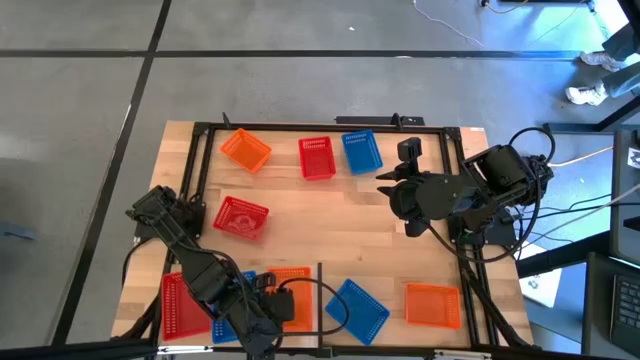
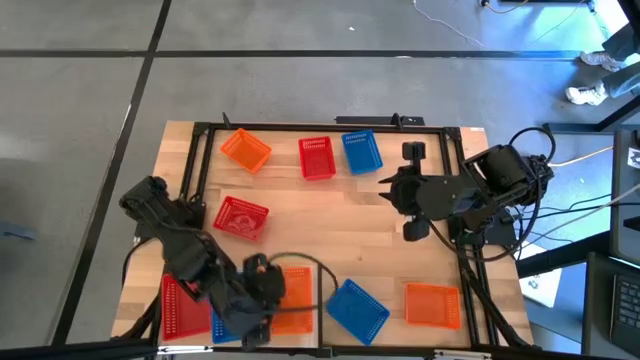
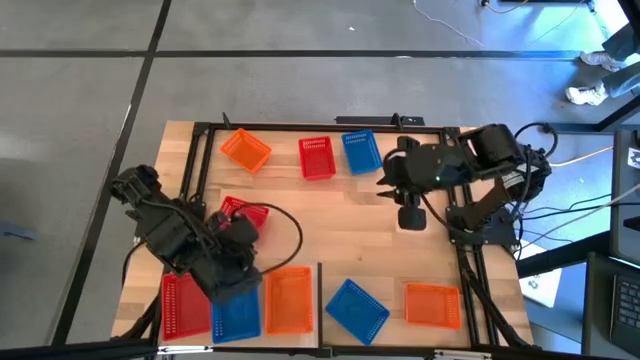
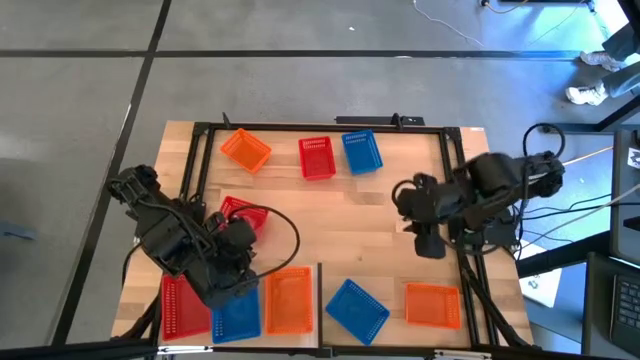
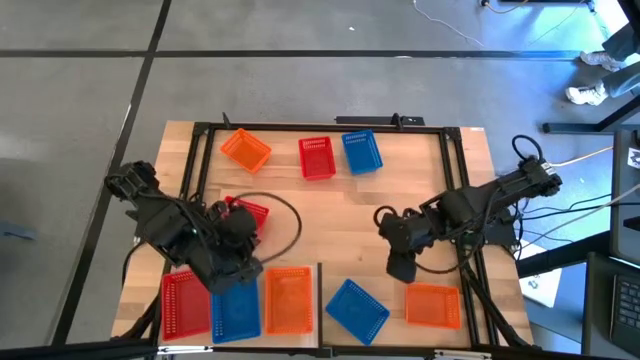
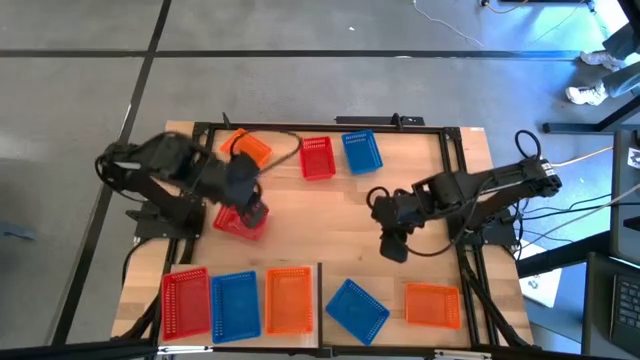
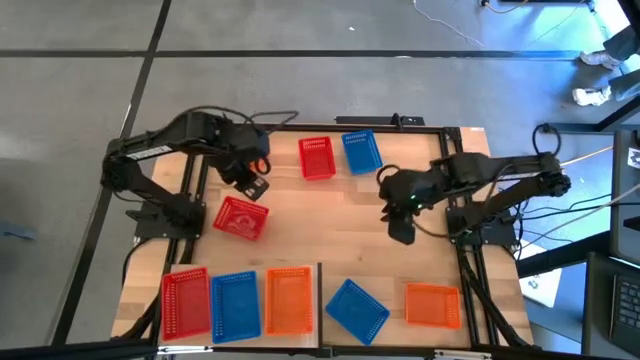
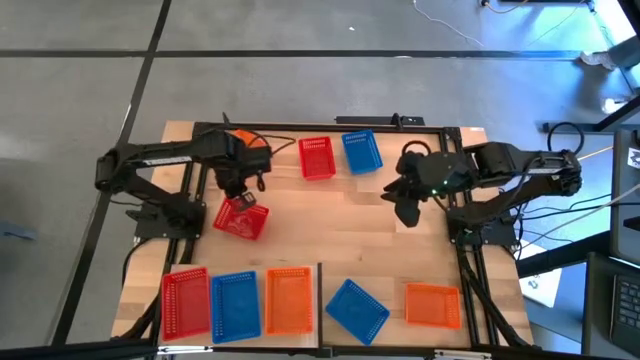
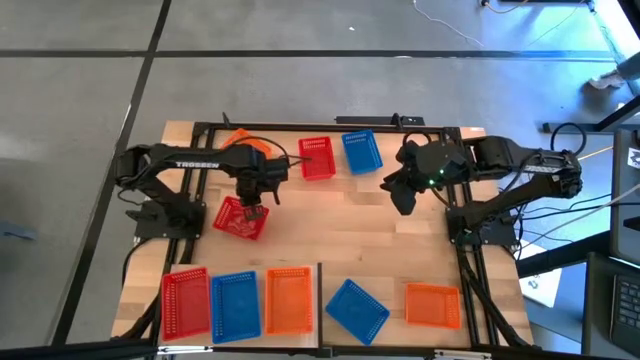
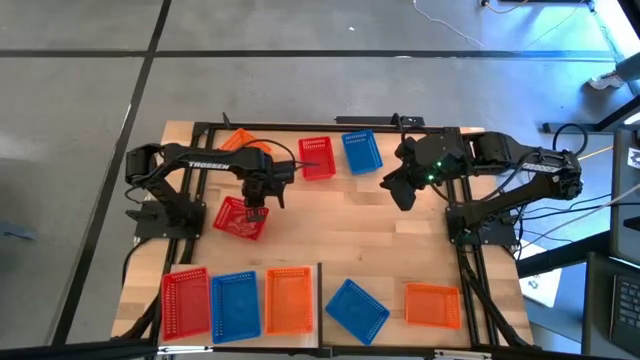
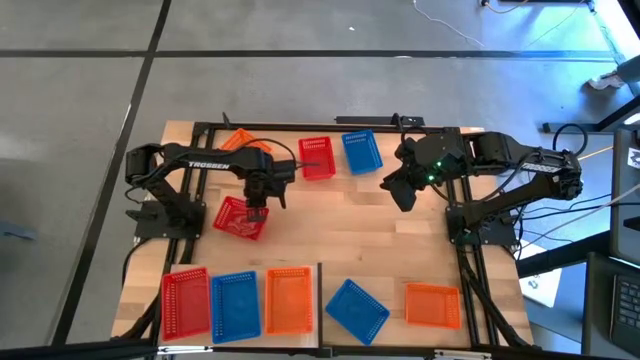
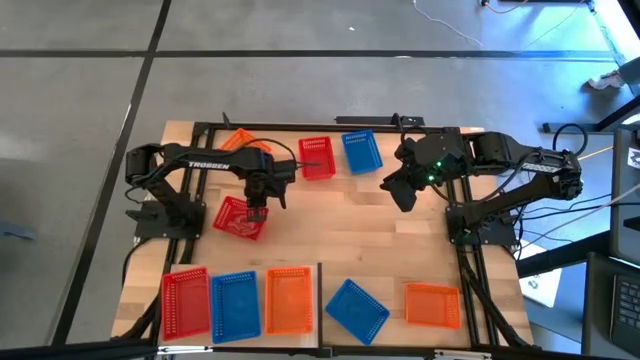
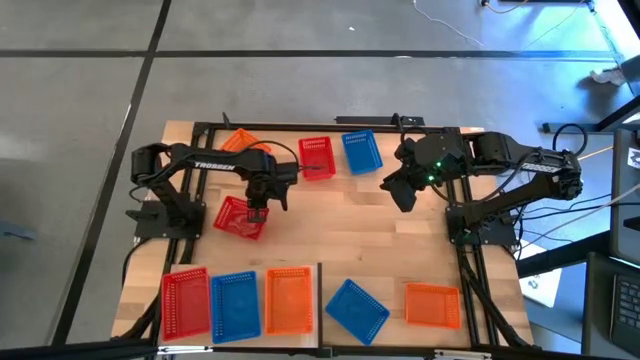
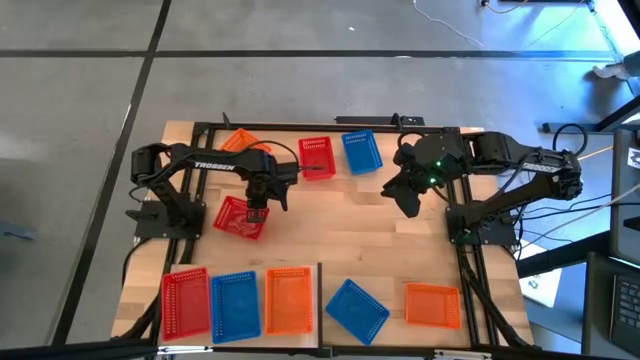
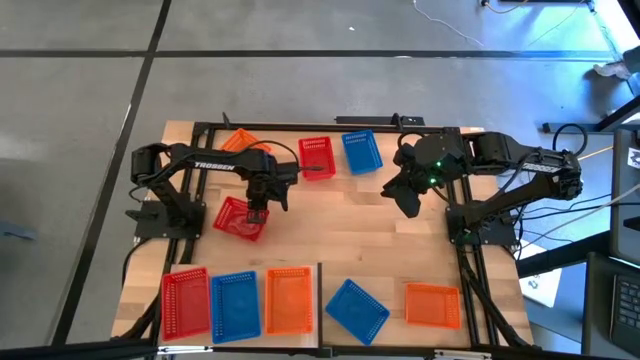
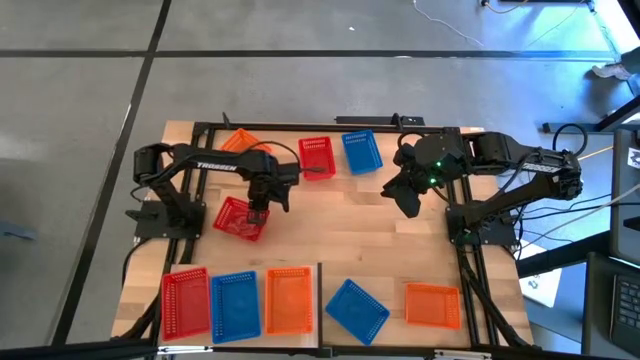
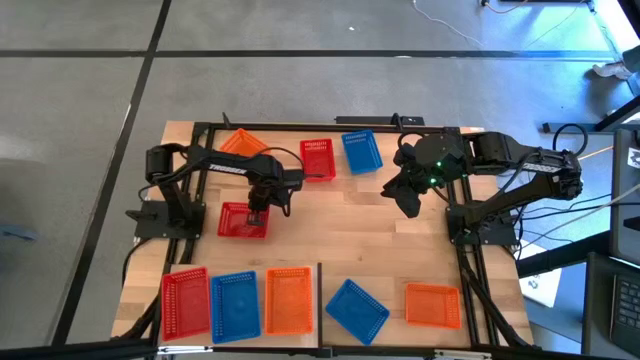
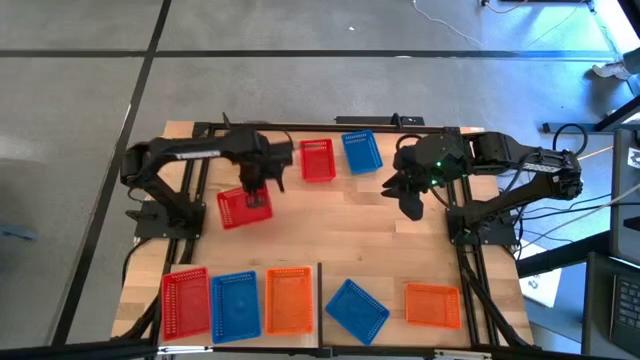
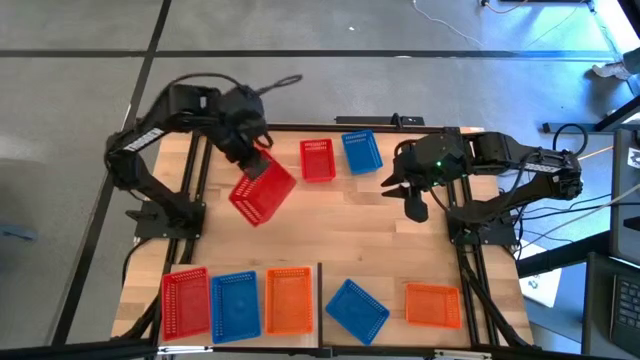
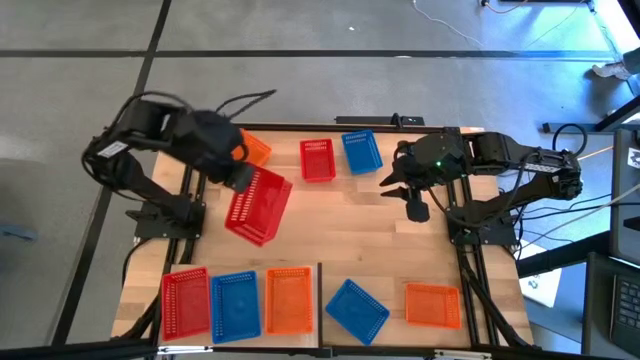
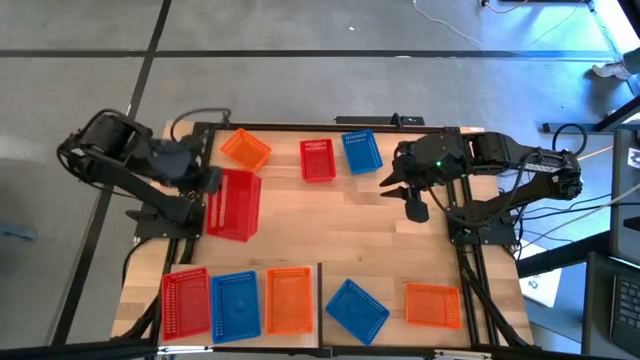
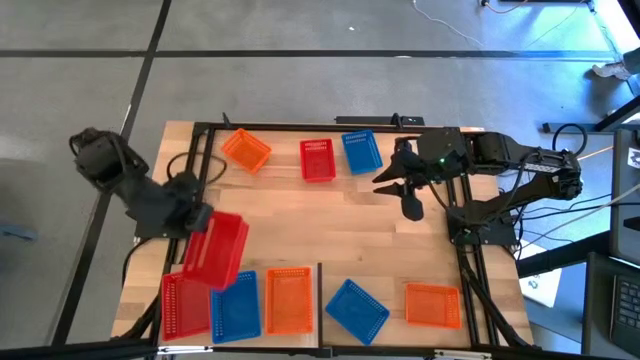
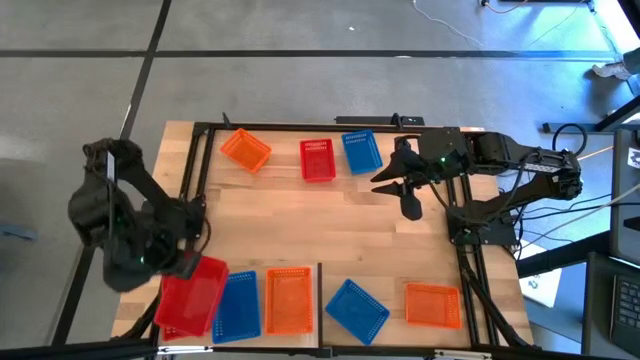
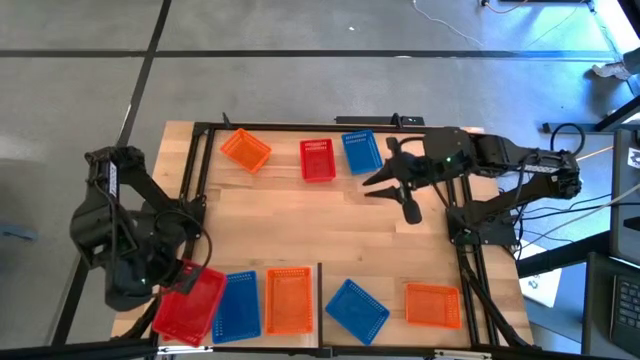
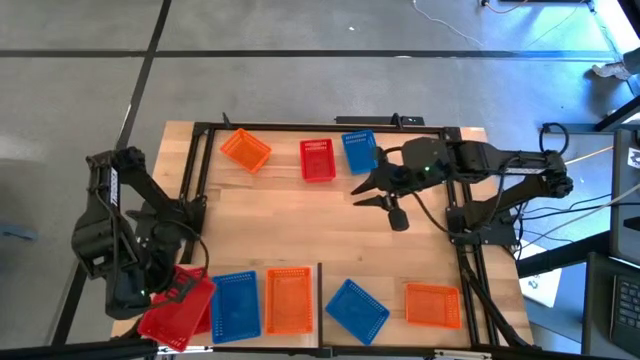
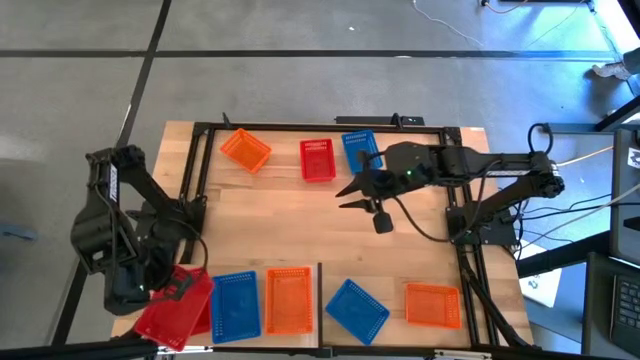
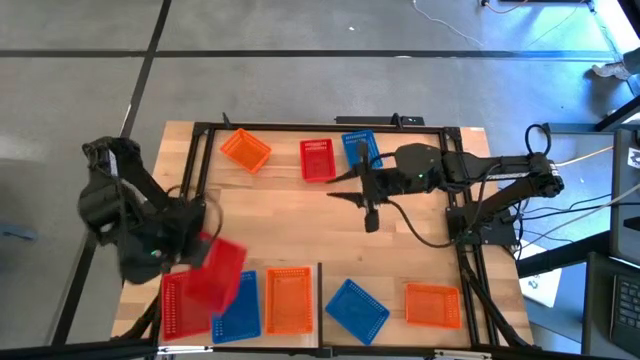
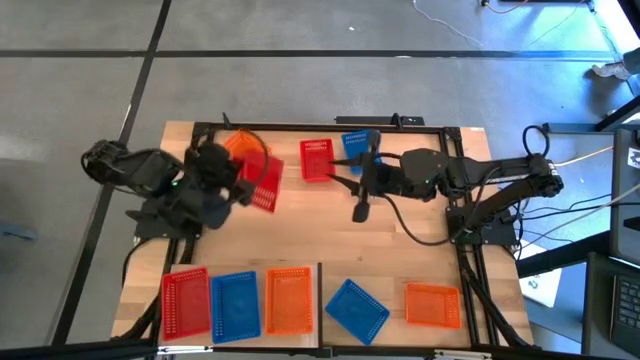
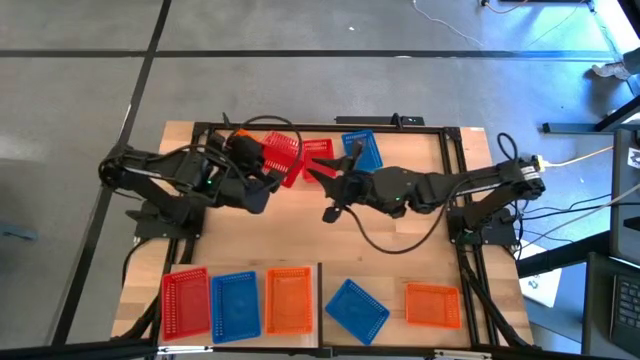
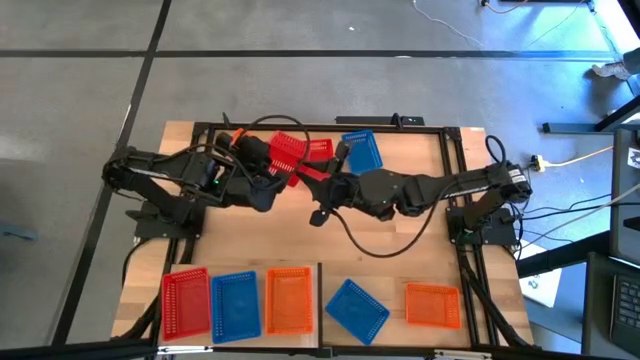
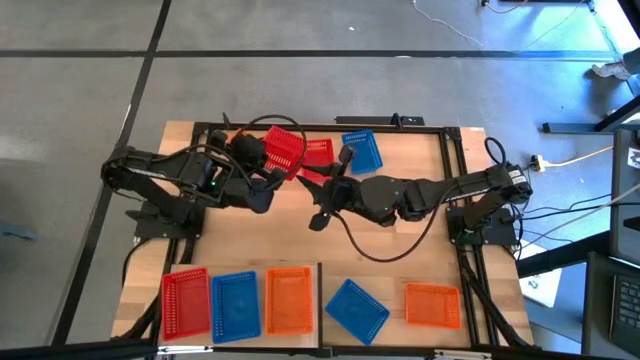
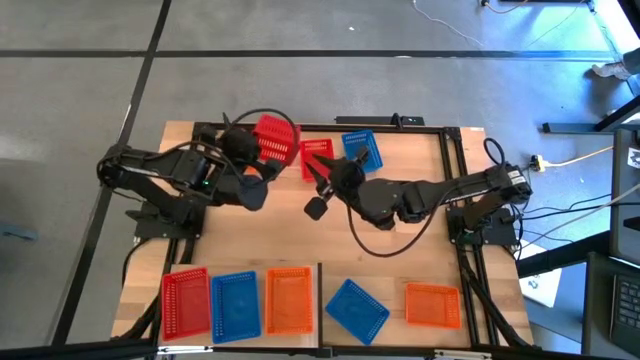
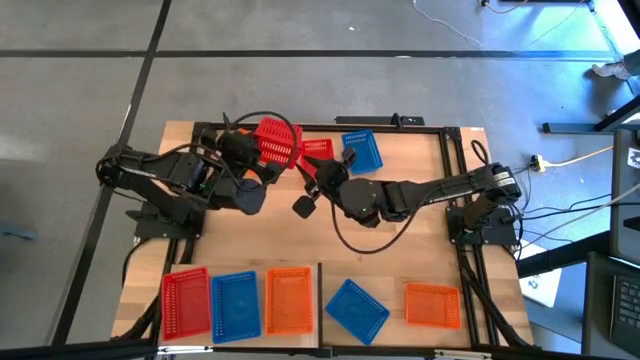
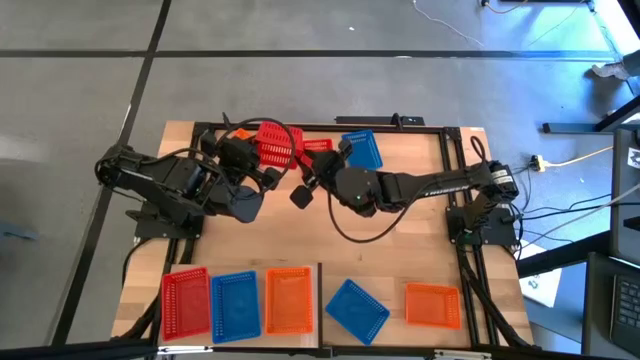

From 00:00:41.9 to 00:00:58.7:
Task: Stack baskets on shelf by color
Stack the bottom red bin on top of the other red bin on the shelf

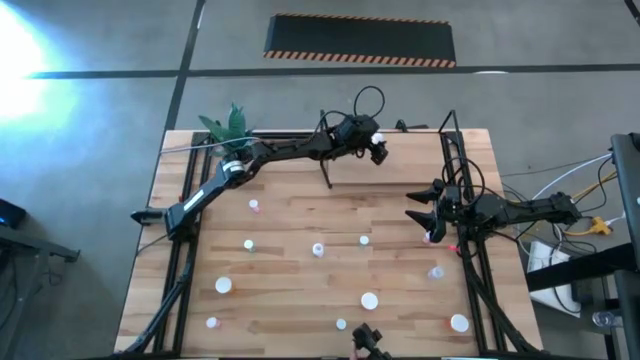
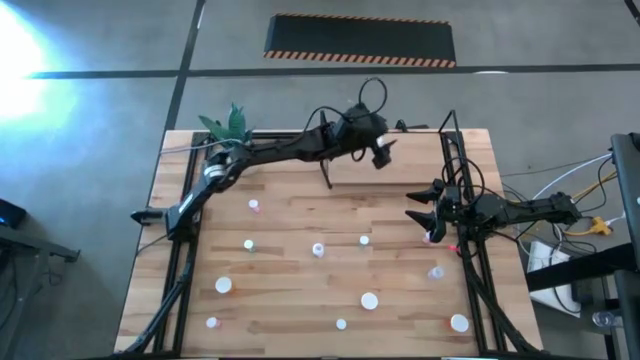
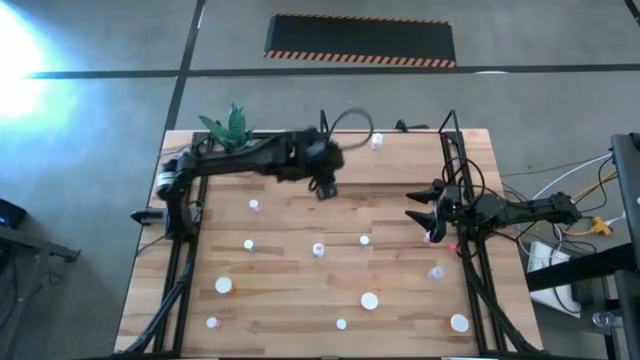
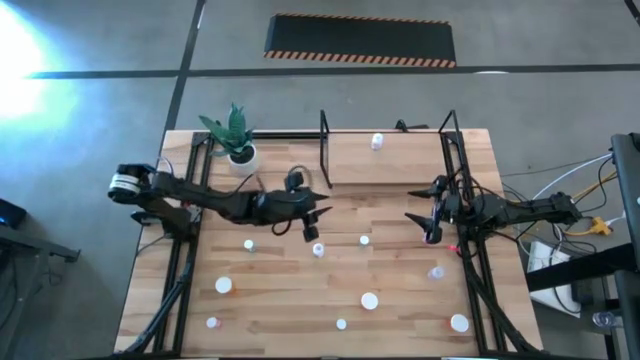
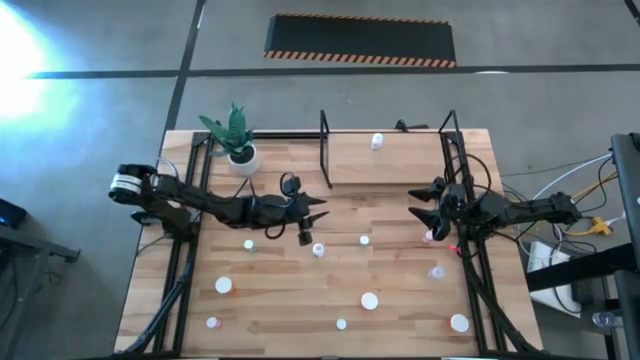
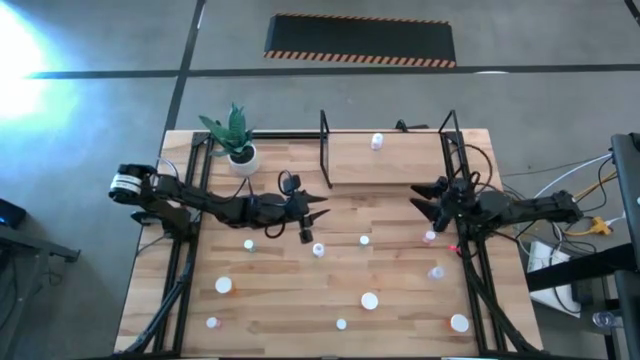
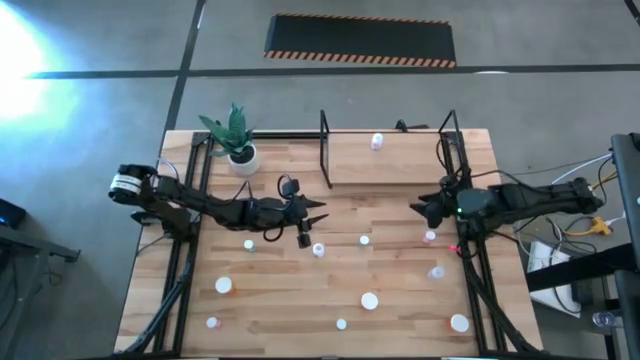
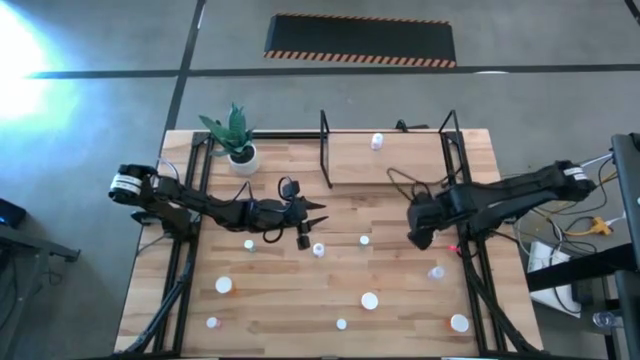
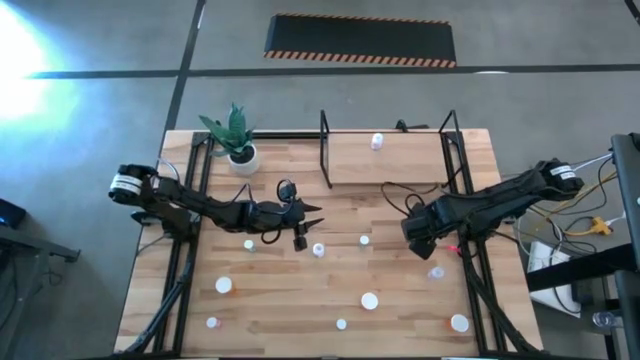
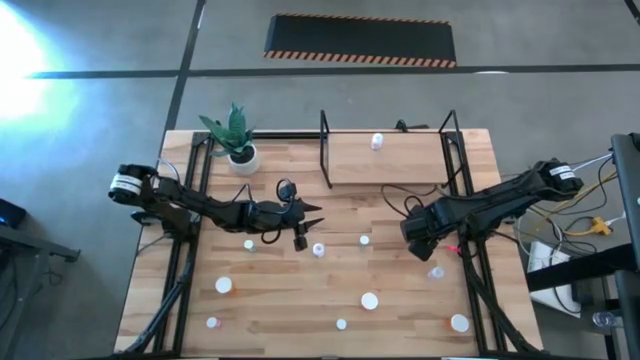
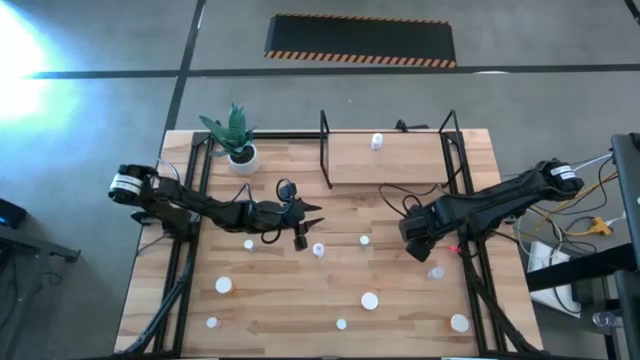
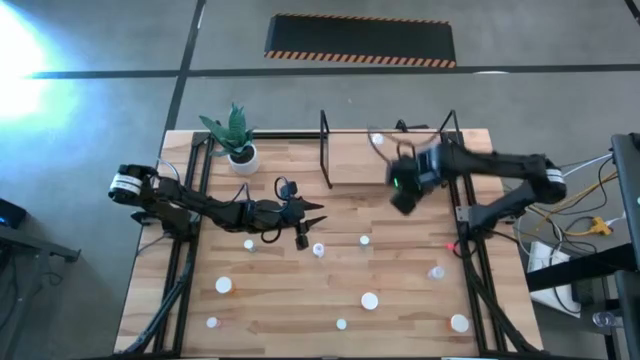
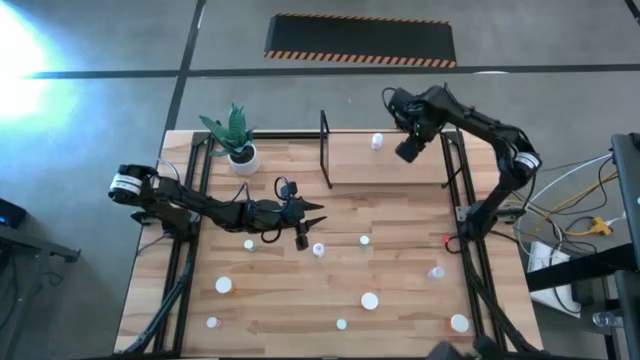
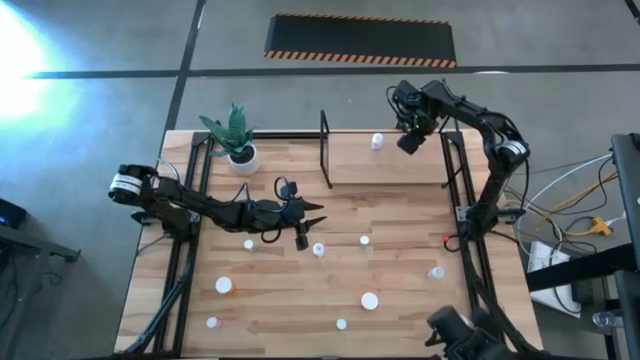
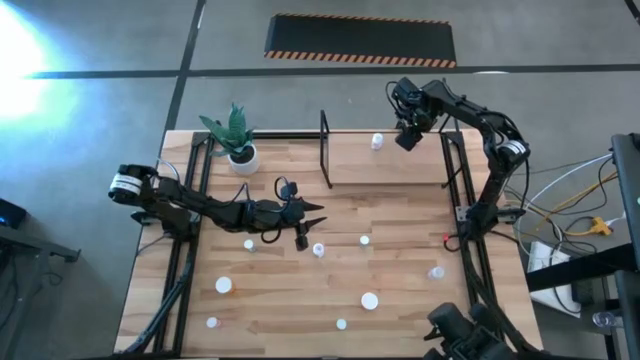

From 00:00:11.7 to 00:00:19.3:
Task: Pick and place medicine bottles onto shelf by color
Put the middle pink pill bottle on the shelf
